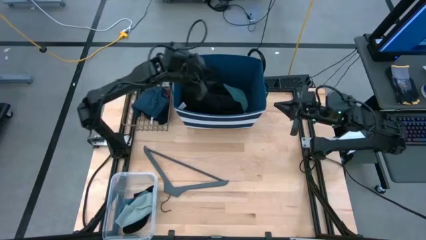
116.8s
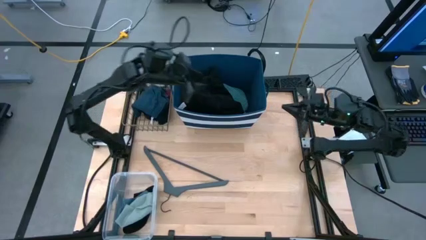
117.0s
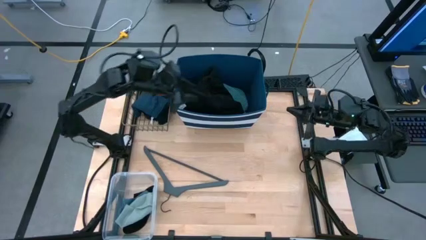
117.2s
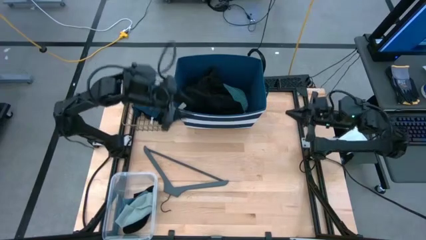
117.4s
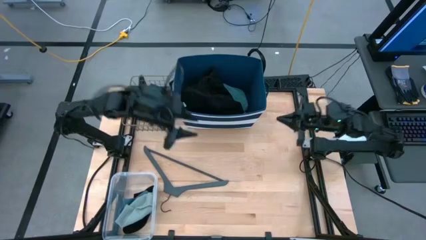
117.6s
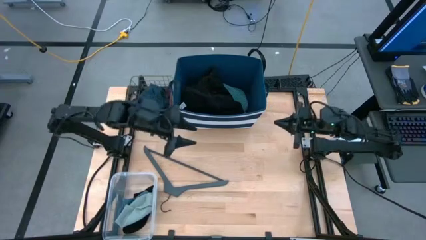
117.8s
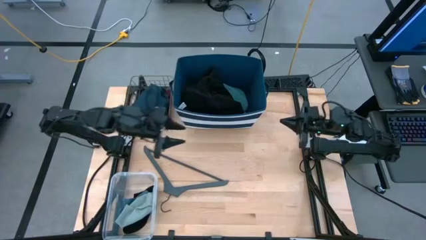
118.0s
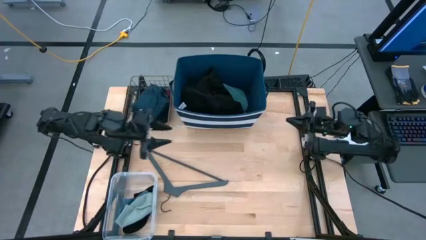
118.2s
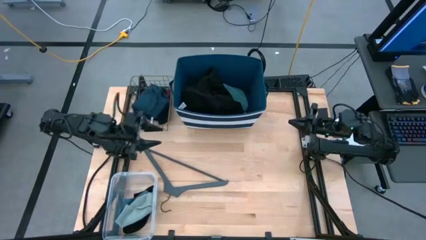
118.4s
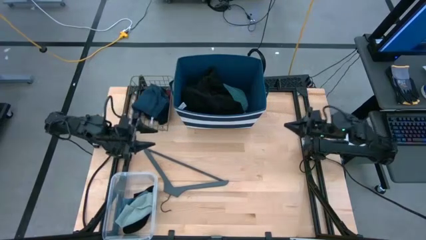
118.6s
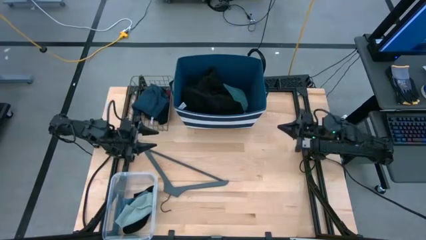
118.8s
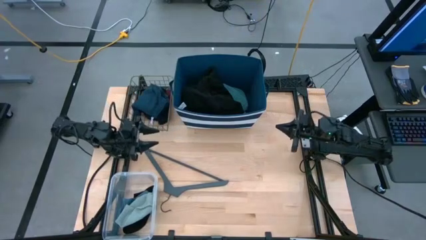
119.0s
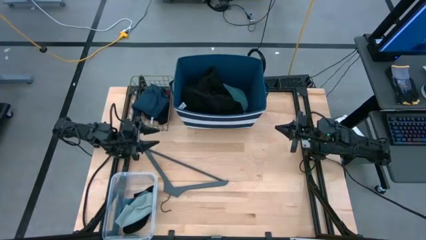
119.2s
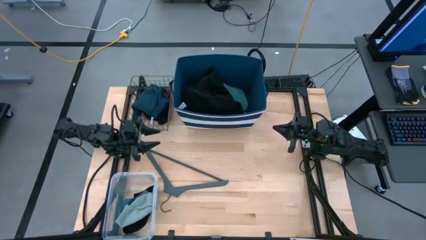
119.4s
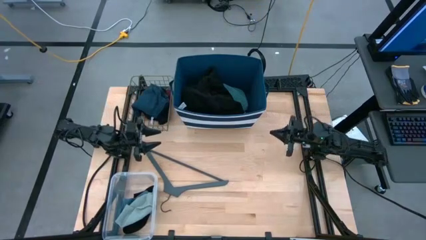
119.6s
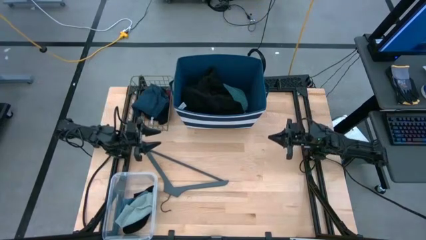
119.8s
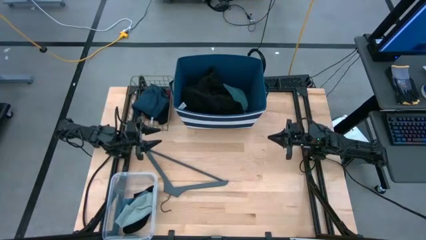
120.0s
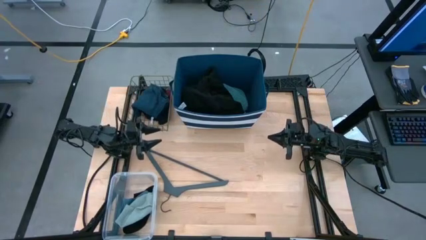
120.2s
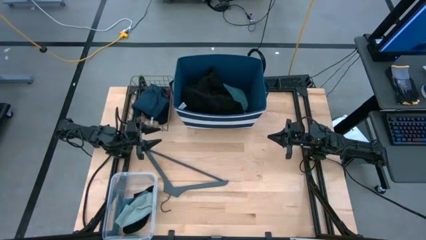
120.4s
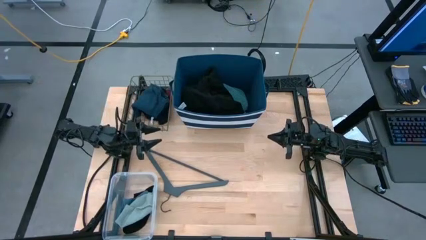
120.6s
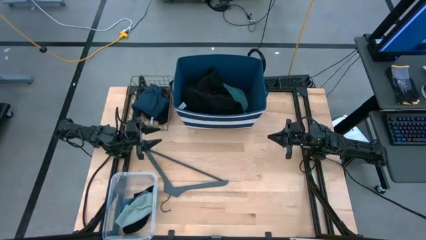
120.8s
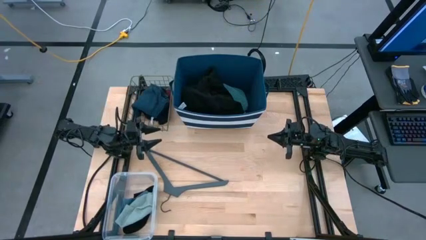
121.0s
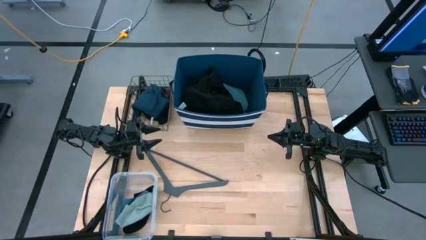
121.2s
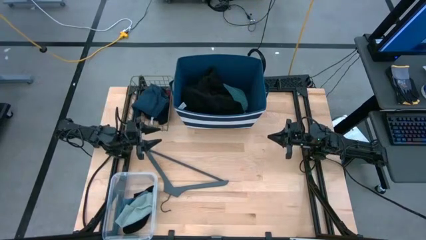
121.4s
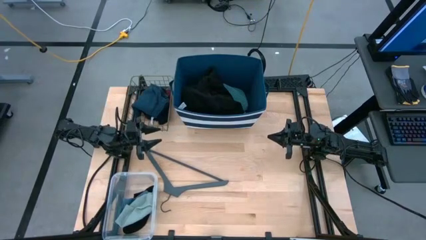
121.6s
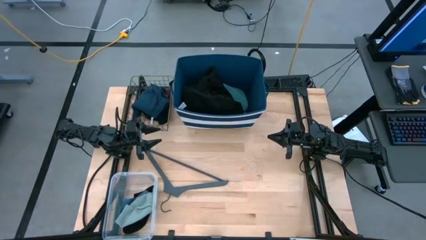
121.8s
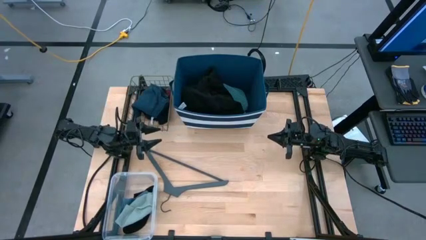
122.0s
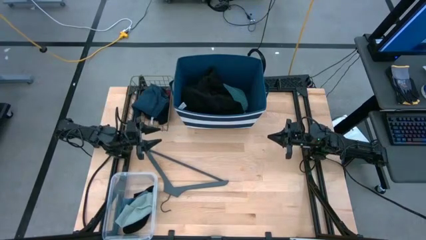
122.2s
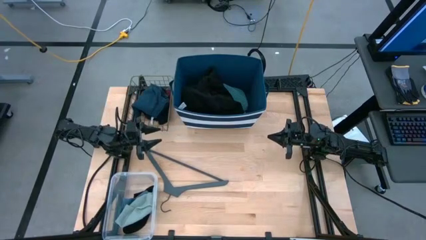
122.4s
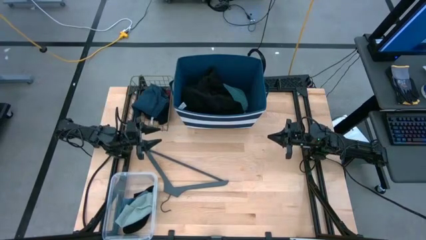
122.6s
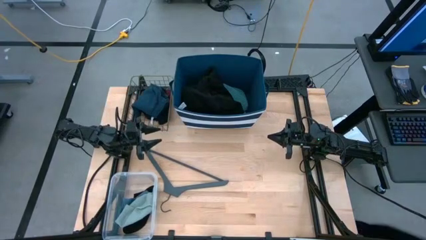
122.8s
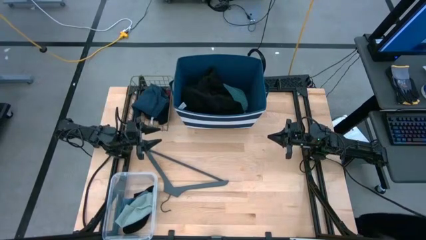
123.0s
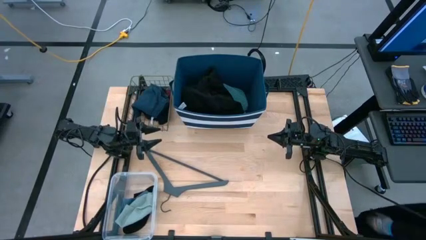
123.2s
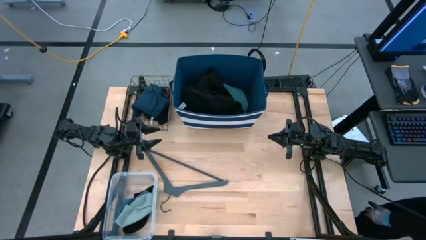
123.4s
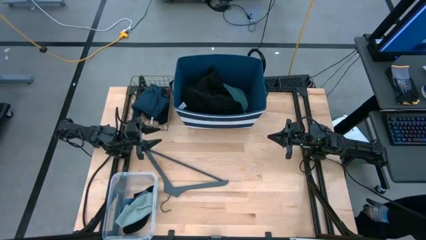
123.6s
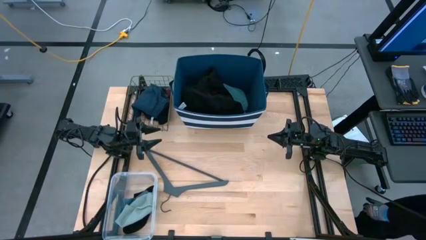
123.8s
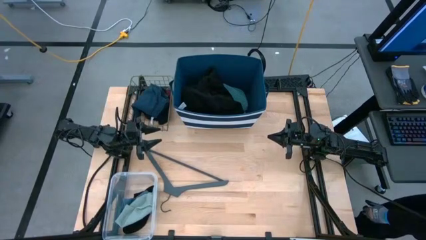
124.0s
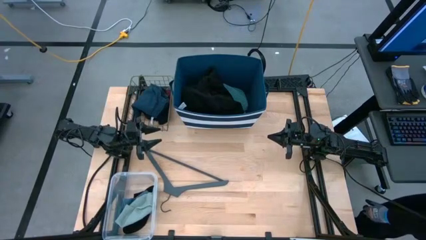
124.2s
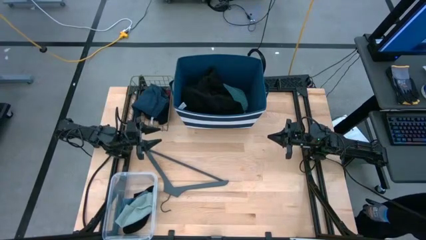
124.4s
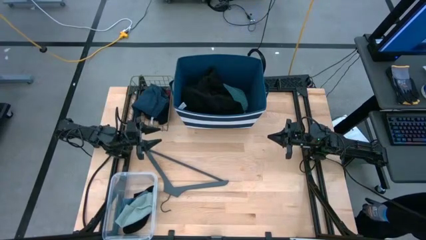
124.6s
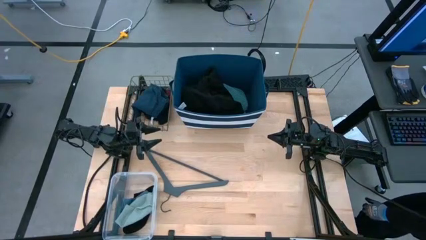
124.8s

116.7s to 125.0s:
Task: Pick & Place Cloths
Return to Home Position
